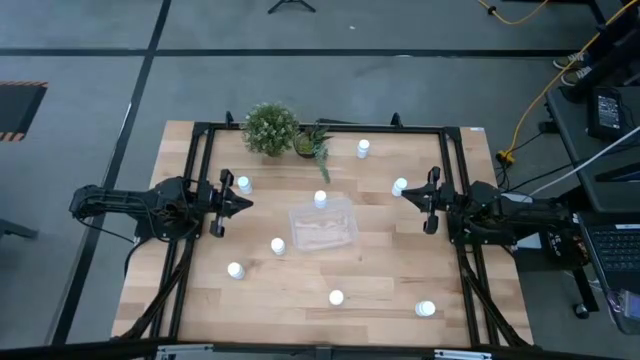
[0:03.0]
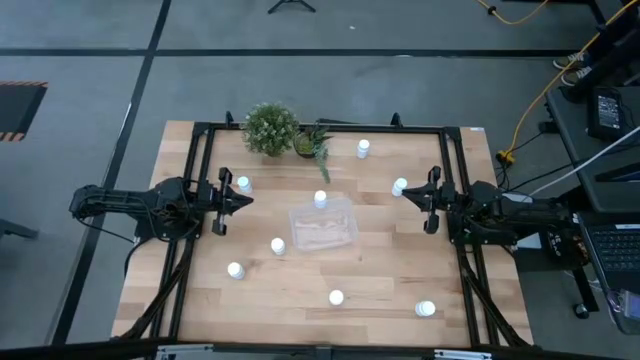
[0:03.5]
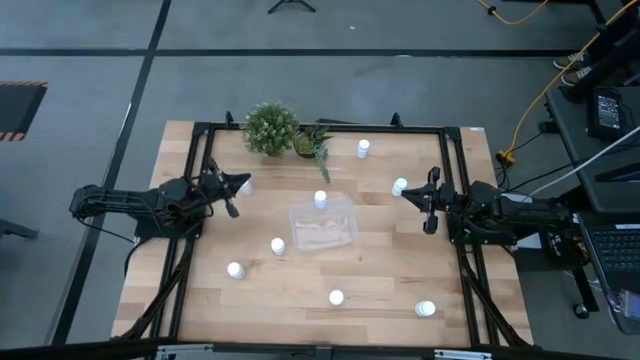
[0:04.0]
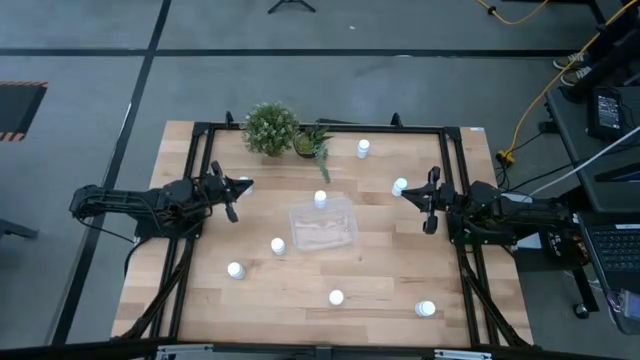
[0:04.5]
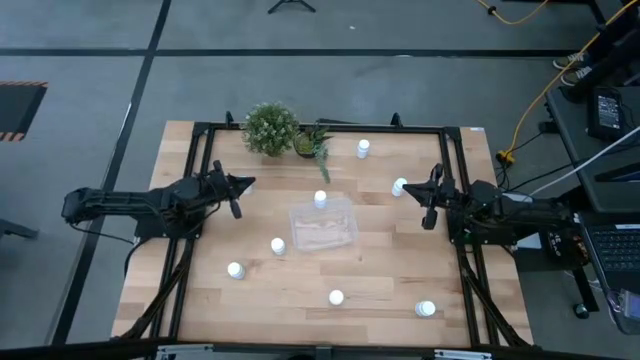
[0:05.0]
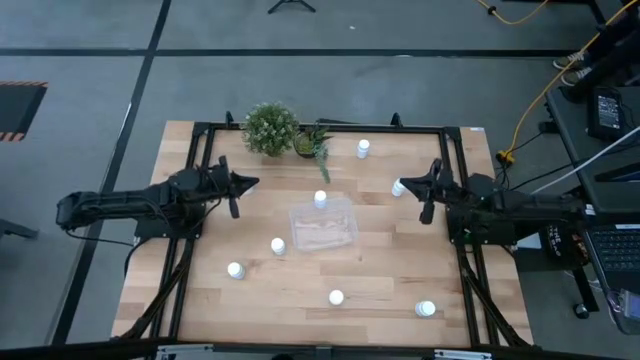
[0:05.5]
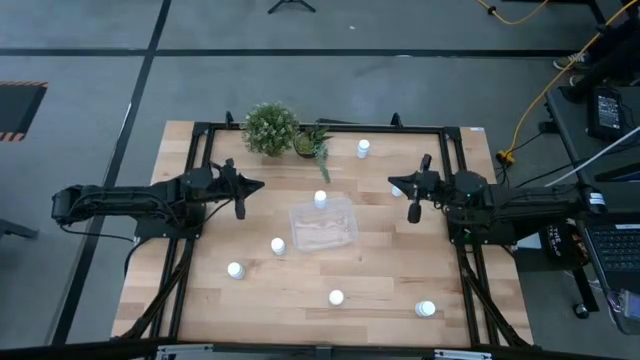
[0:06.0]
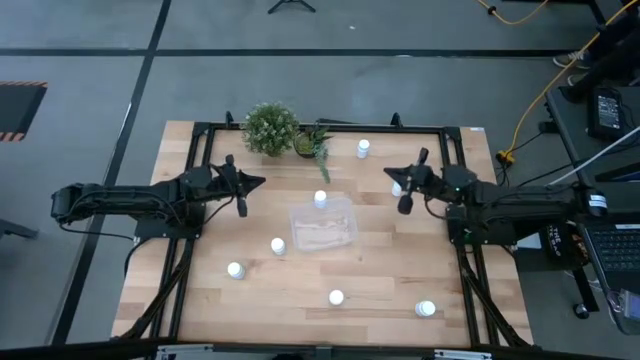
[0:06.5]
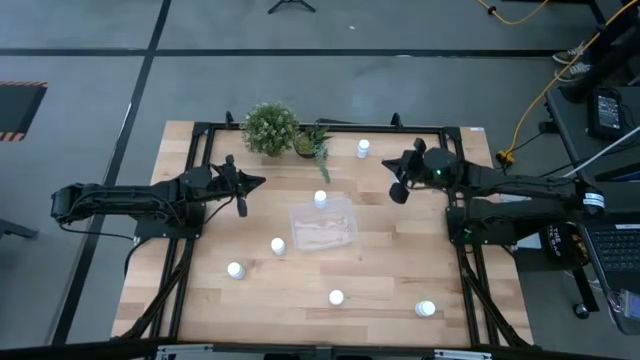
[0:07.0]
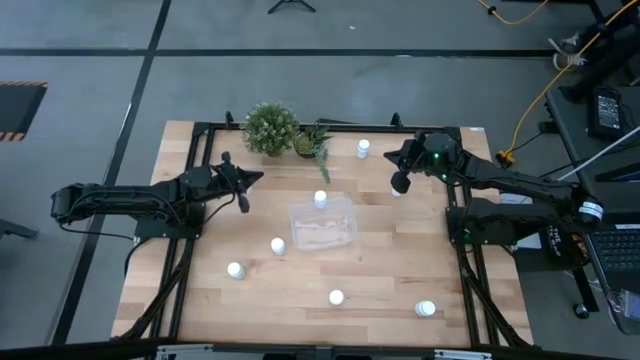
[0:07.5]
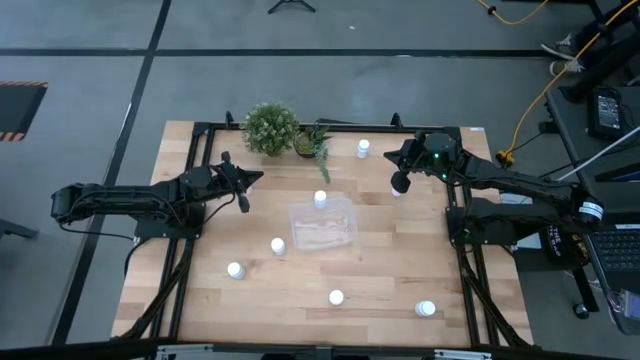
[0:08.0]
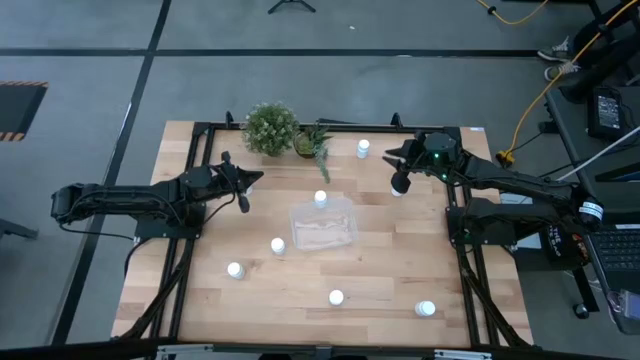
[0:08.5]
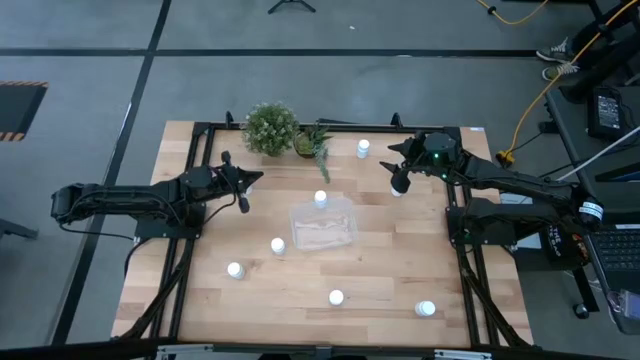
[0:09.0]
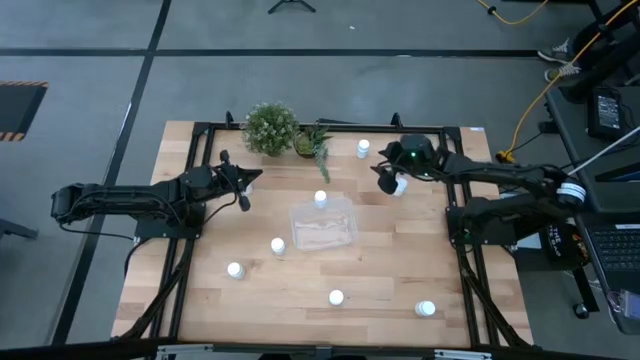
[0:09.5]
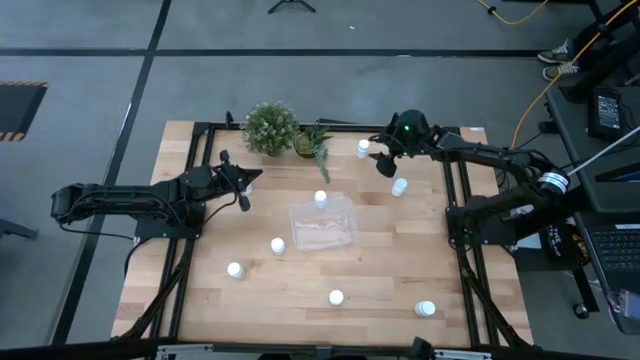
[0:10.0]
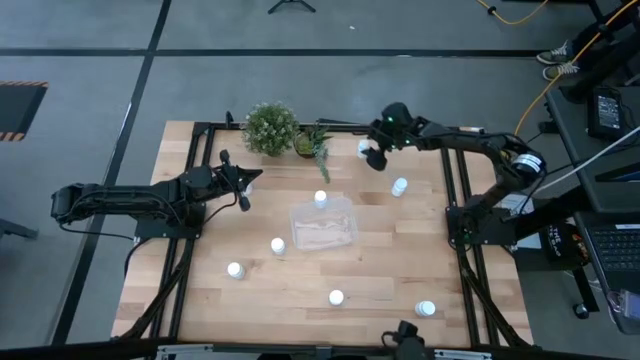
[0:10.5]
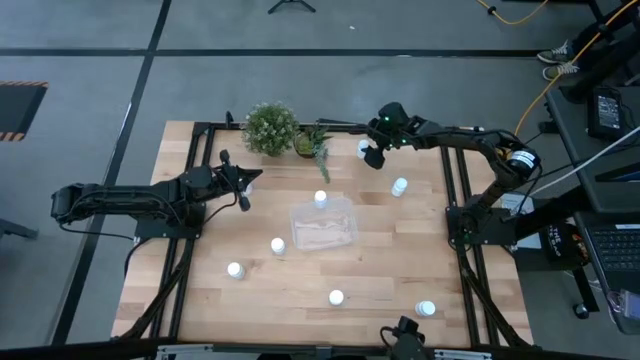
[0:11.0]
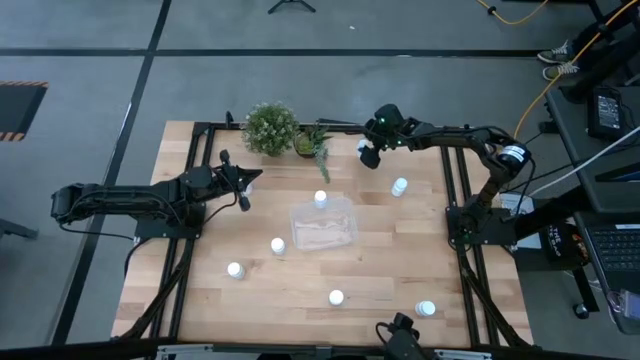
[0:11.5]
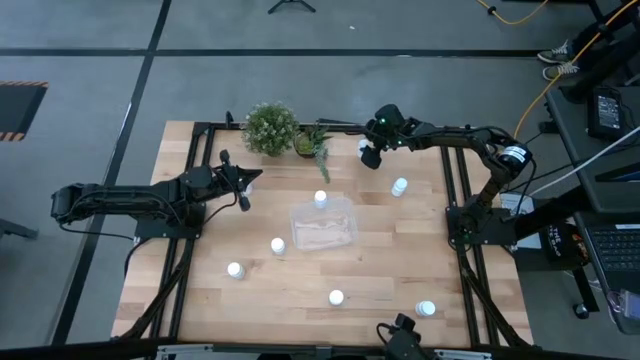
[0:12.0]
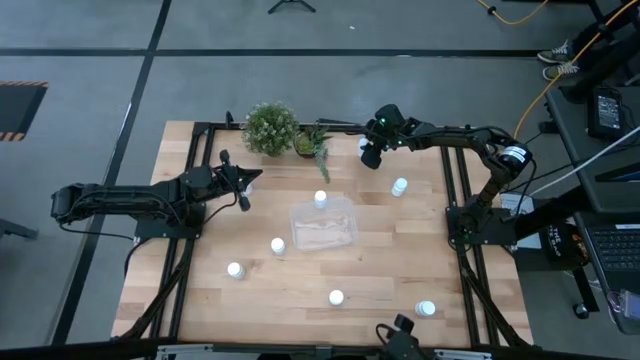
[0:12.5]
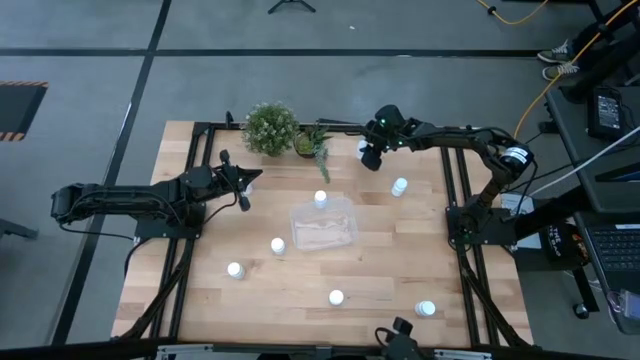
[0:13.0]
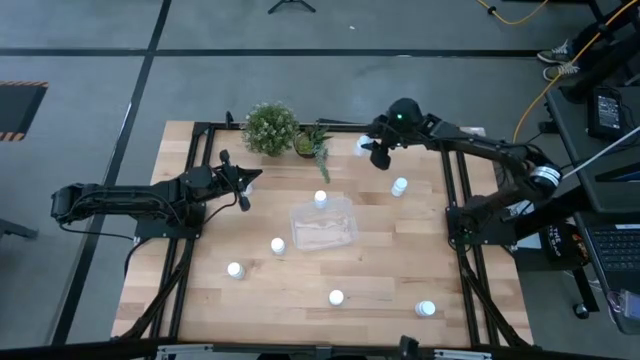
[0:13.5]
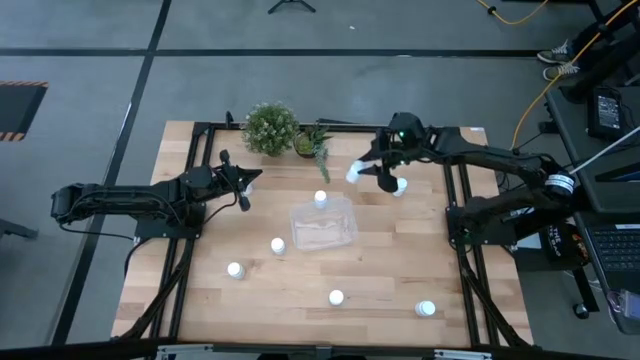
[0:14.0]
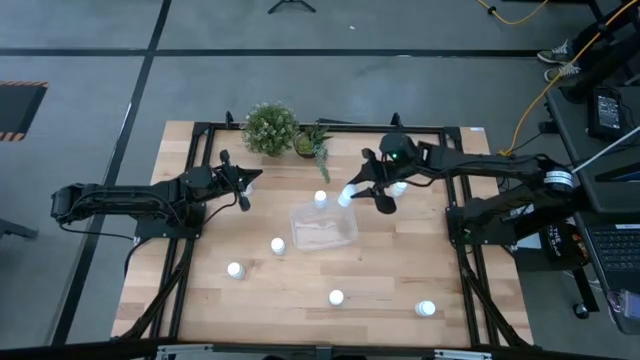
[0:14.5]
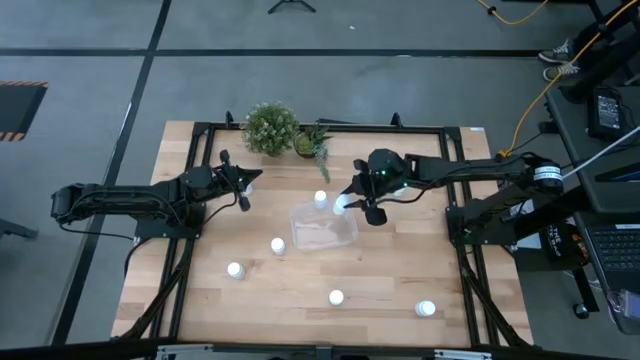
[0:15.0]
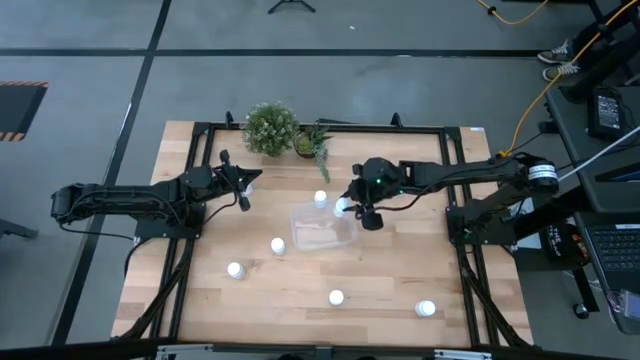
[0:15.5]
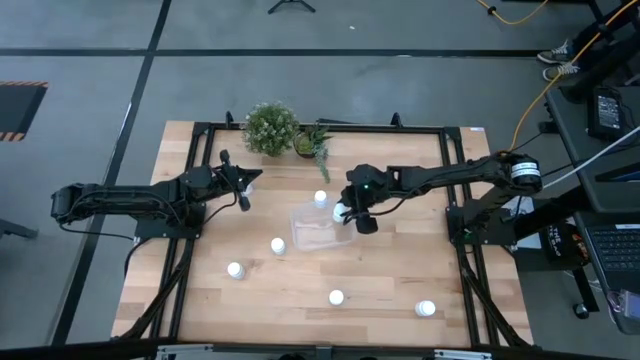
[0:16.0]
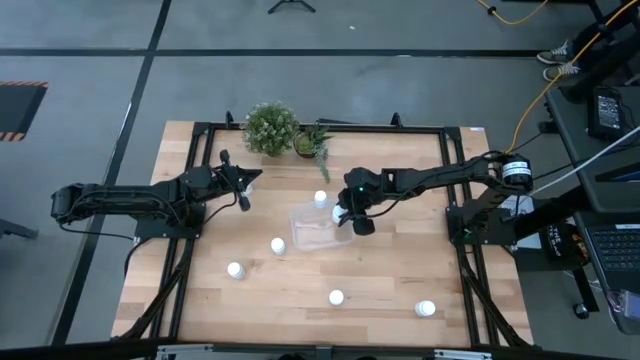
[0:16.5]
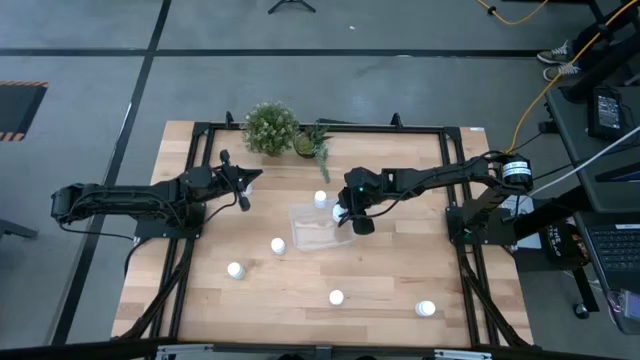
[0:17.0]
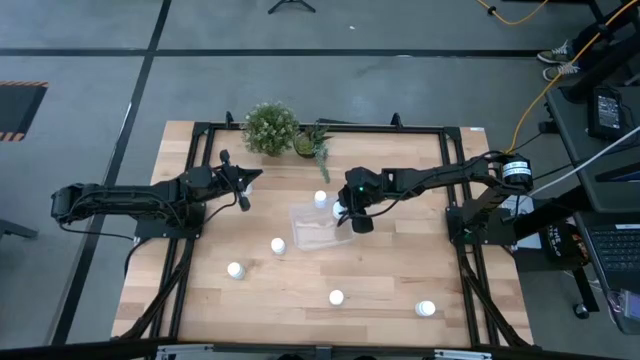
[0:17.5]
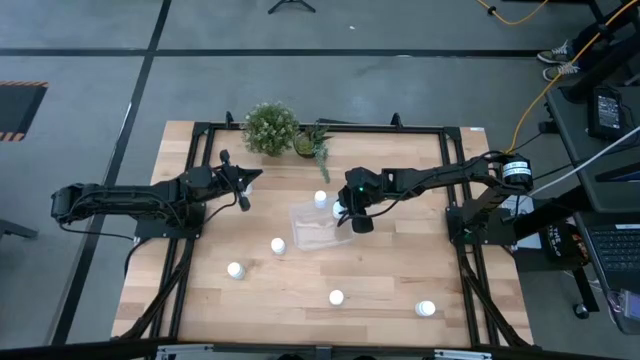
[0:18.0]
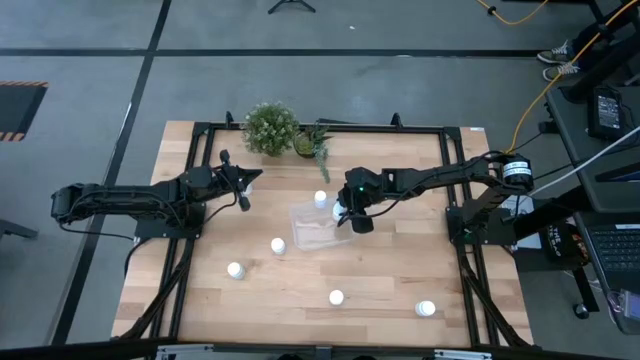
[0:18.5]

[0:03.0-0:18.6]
Task: Pick and place pill bottles into a basket
Put the white pill bottle into the transparent bin

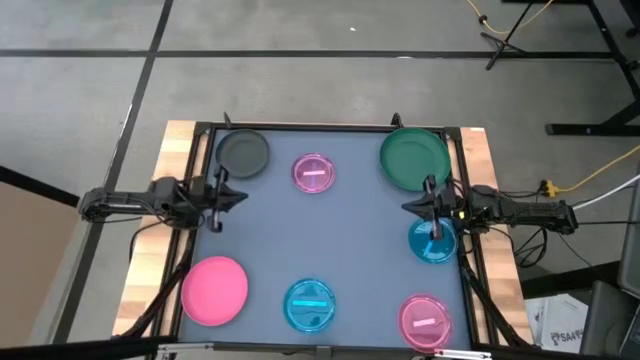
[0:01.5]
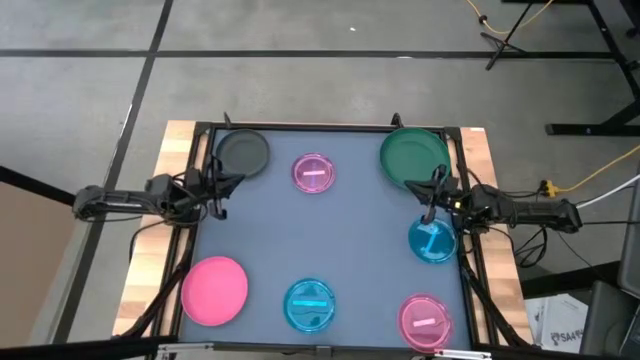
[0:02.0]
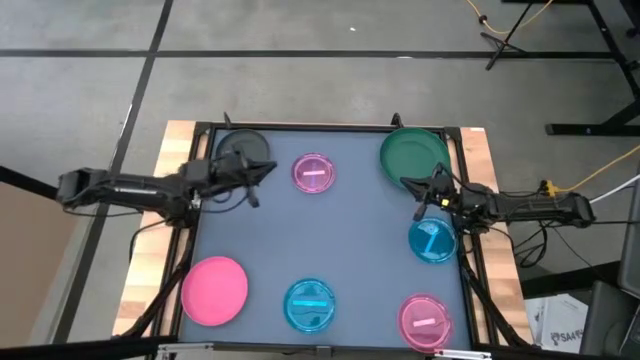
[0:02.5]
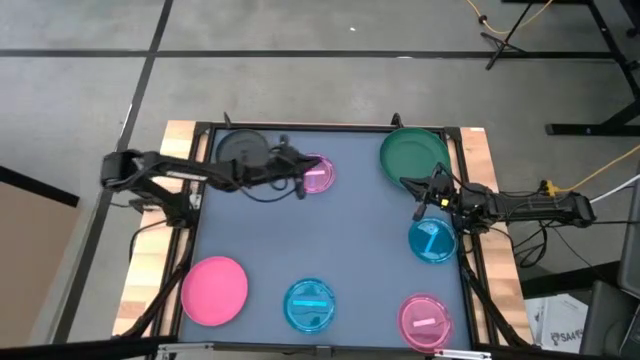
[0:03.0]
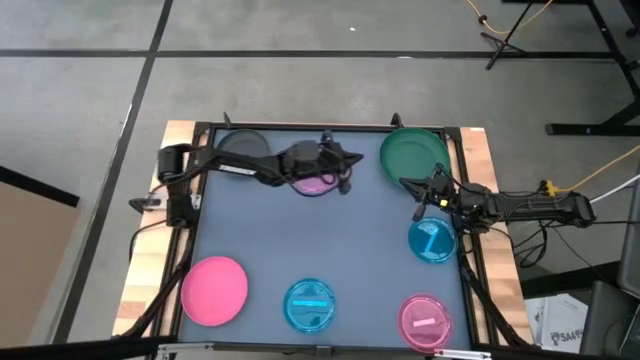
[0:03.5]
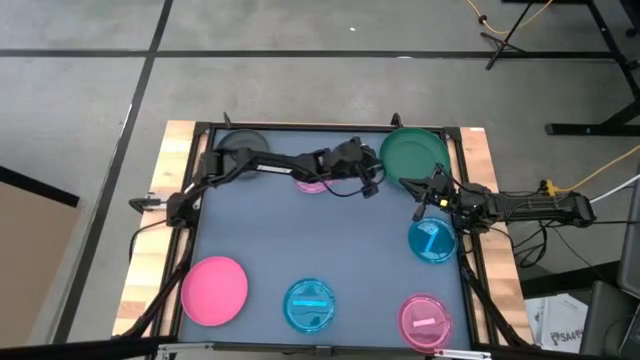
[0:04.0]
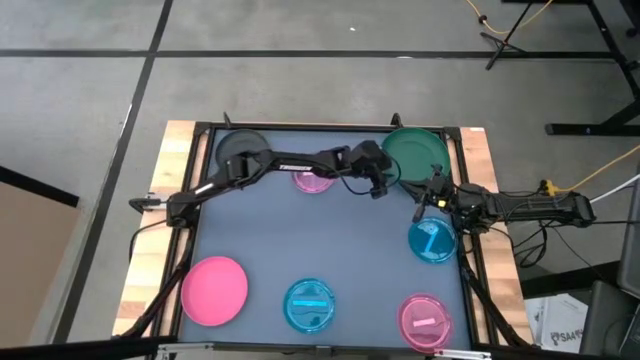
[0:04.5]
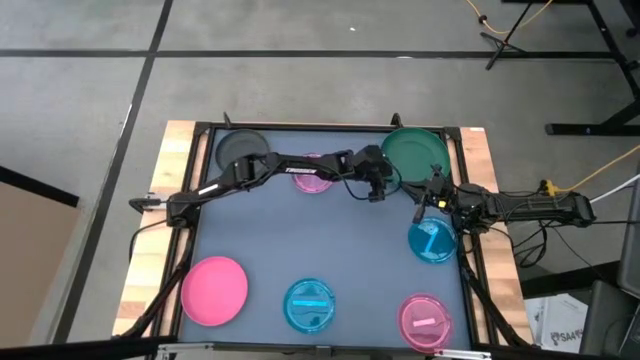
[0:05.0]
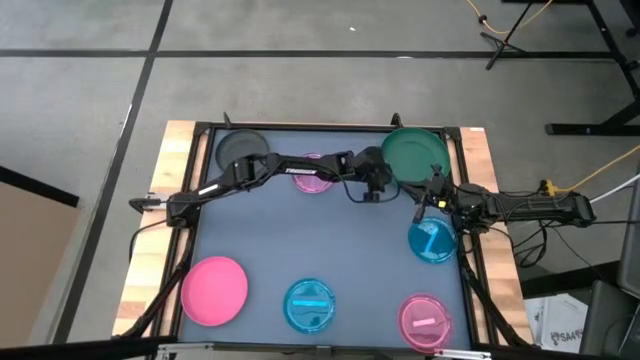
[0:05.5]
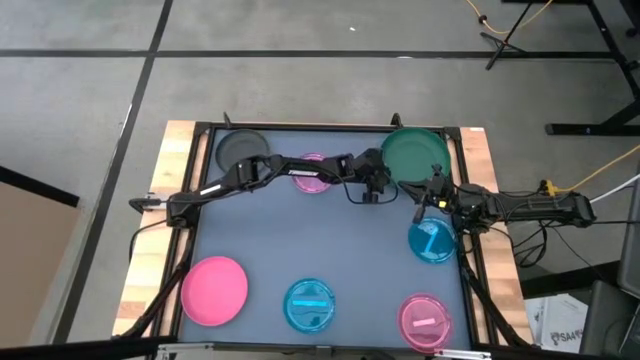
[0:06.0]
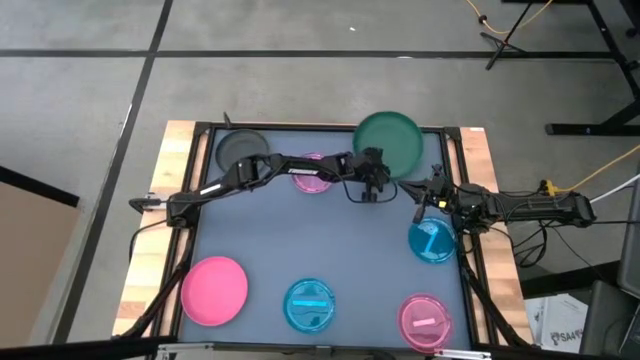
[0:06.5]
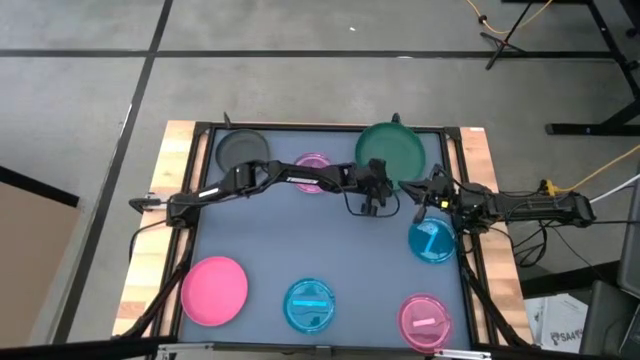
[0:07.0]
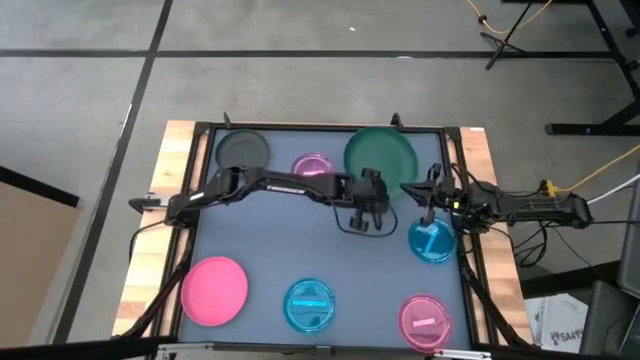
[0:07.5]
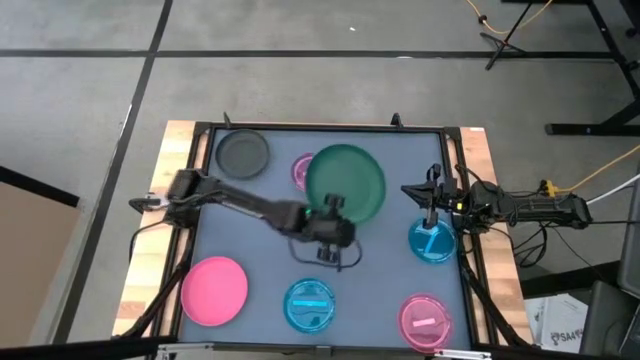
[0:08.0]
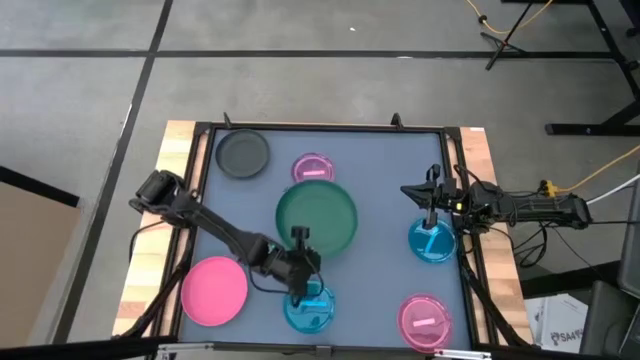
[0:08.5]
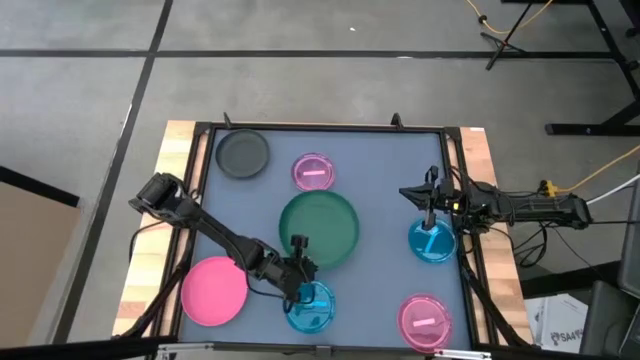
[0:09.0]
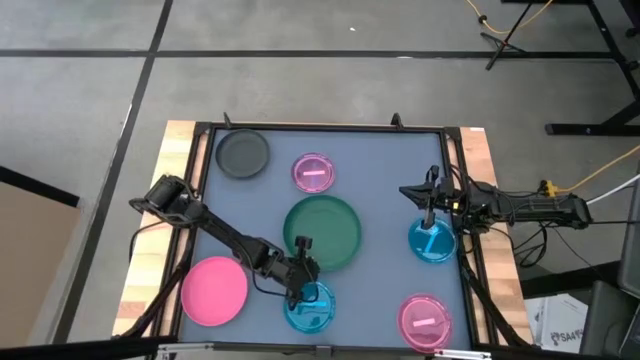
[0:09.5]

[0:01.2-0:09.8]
Task: Stack plastic plates
Prepare the green plate
